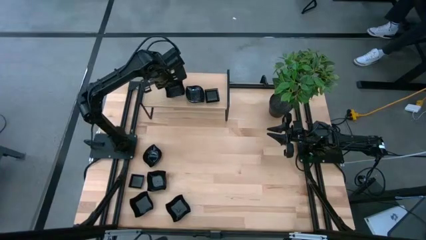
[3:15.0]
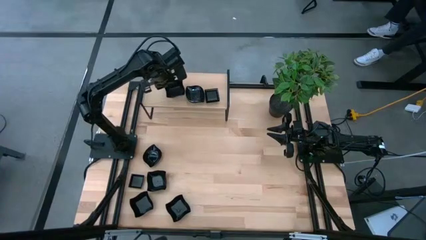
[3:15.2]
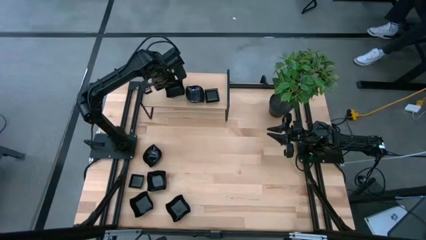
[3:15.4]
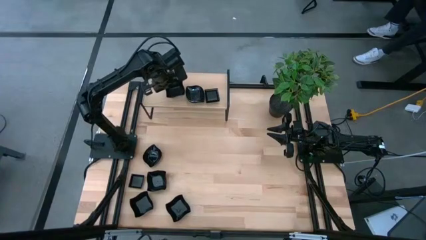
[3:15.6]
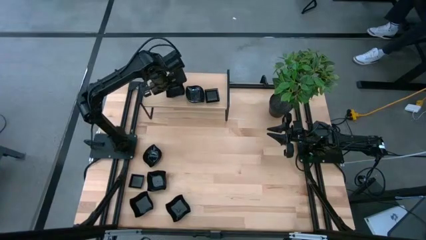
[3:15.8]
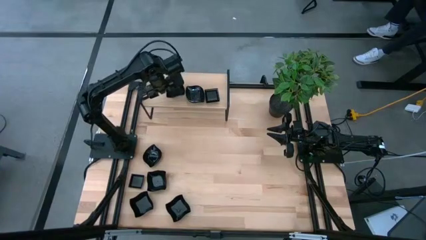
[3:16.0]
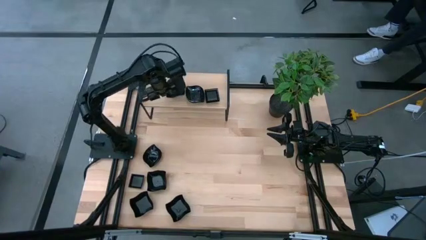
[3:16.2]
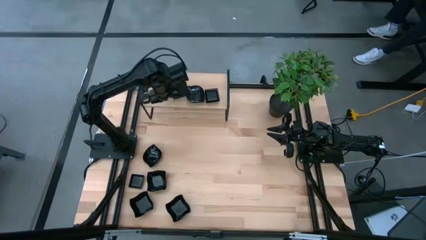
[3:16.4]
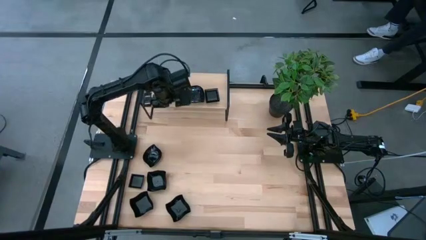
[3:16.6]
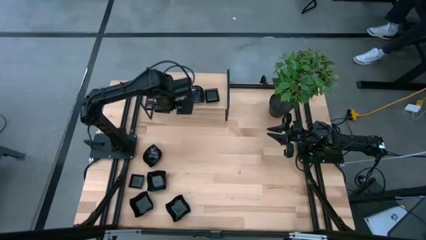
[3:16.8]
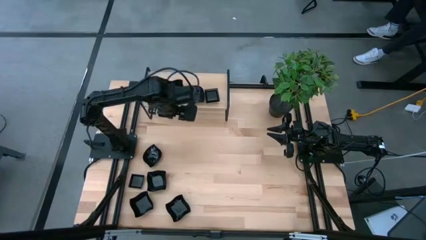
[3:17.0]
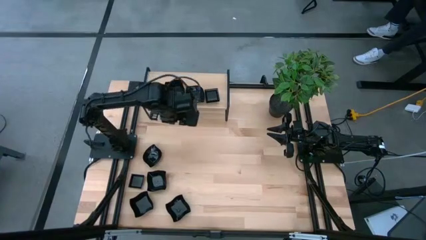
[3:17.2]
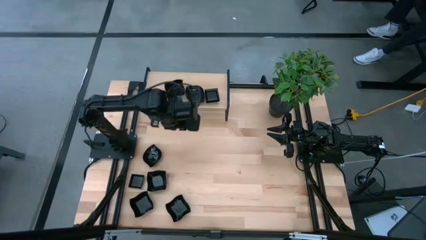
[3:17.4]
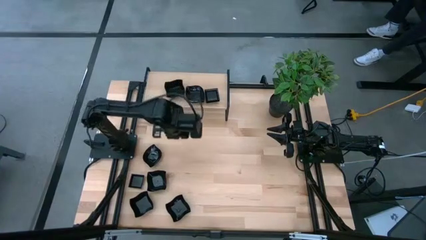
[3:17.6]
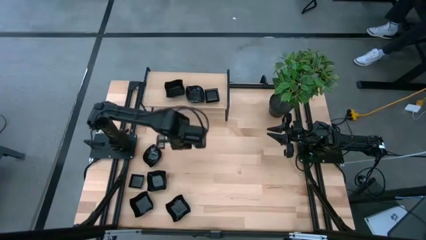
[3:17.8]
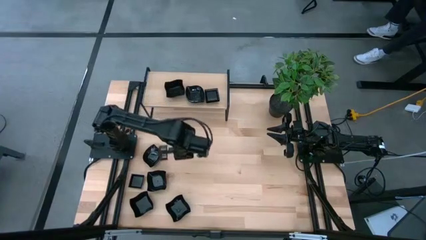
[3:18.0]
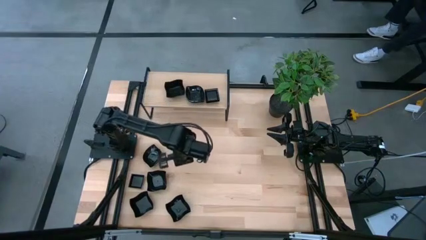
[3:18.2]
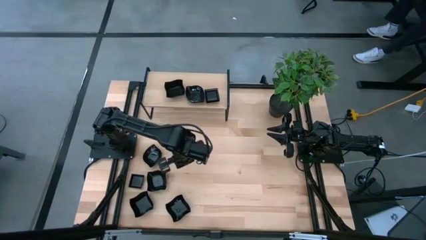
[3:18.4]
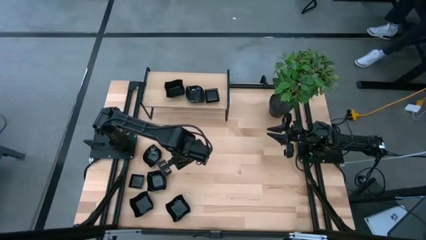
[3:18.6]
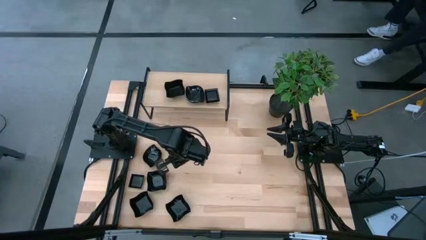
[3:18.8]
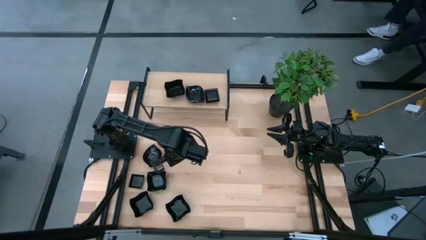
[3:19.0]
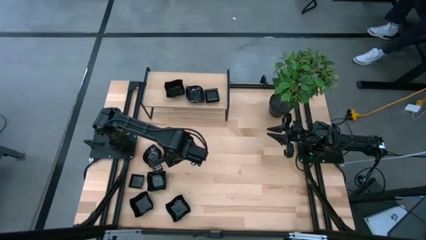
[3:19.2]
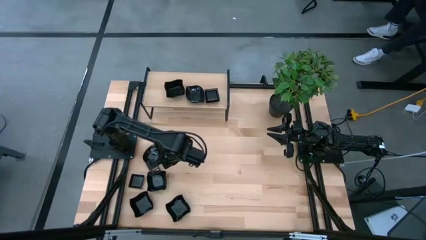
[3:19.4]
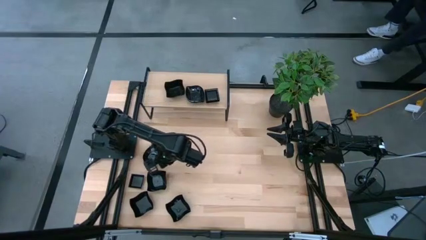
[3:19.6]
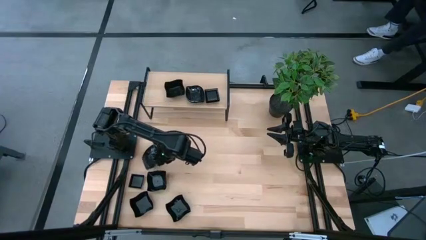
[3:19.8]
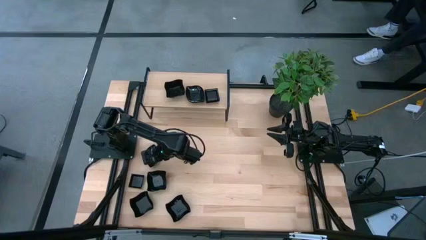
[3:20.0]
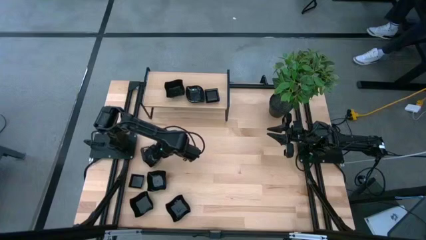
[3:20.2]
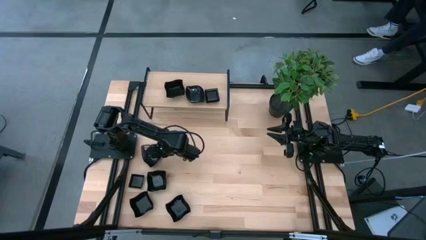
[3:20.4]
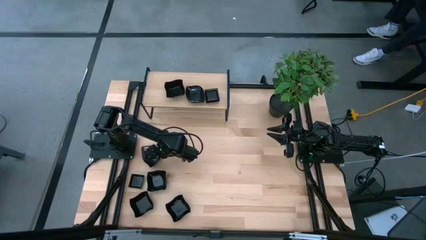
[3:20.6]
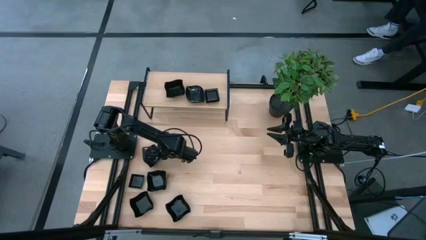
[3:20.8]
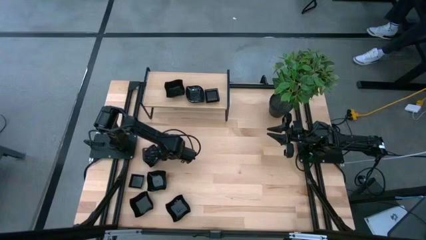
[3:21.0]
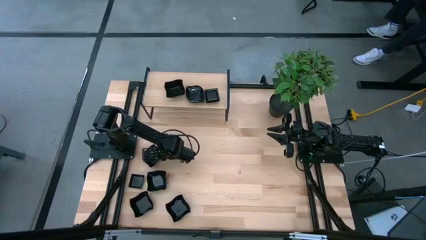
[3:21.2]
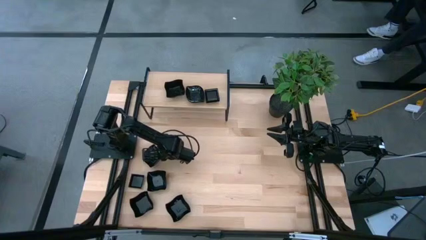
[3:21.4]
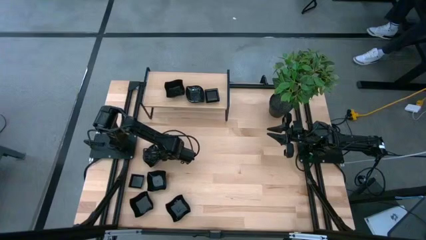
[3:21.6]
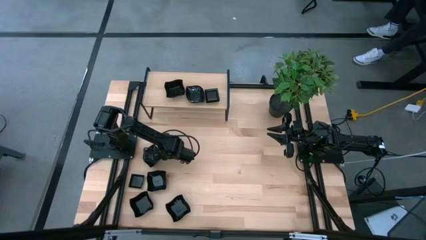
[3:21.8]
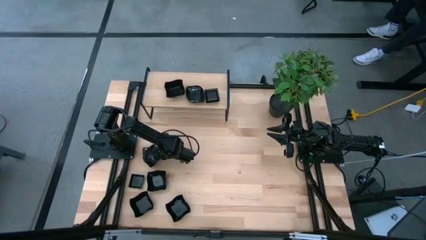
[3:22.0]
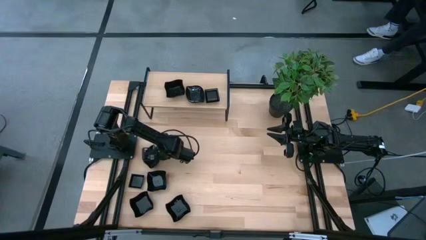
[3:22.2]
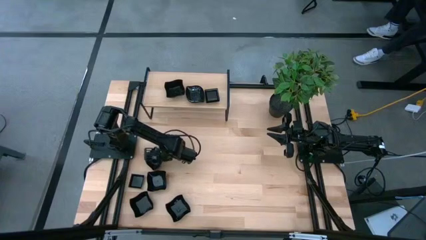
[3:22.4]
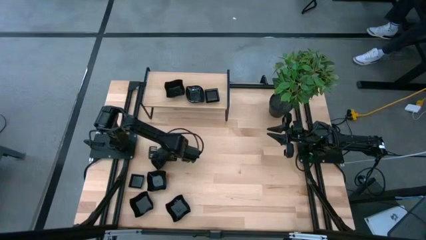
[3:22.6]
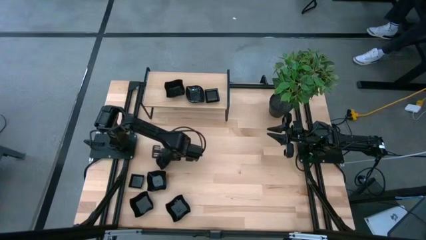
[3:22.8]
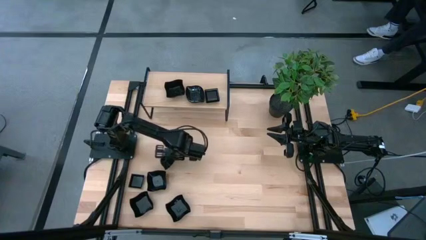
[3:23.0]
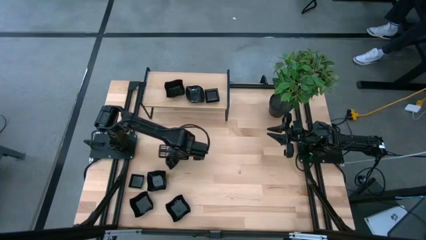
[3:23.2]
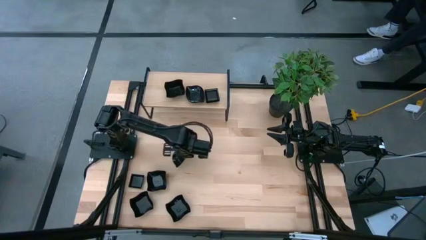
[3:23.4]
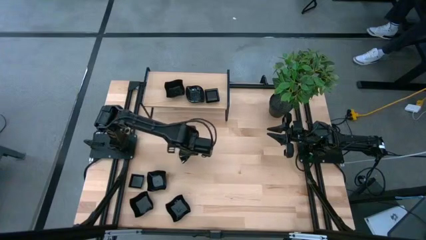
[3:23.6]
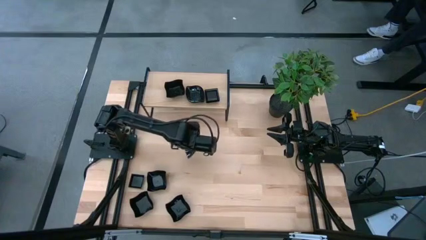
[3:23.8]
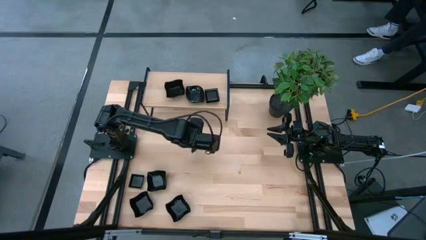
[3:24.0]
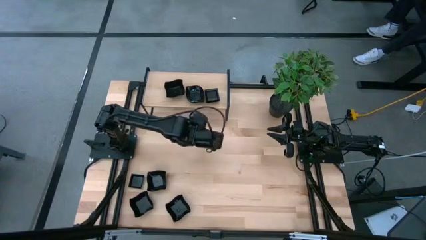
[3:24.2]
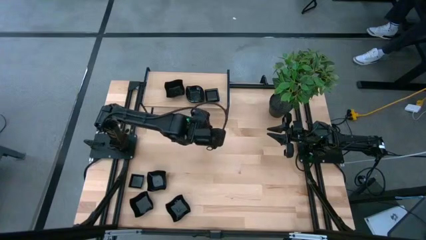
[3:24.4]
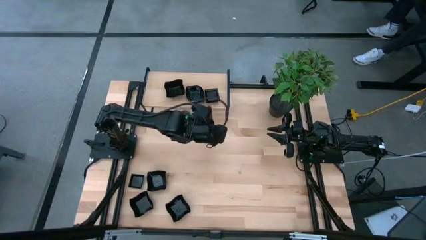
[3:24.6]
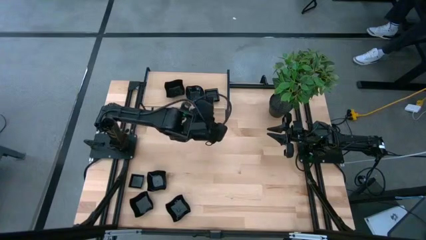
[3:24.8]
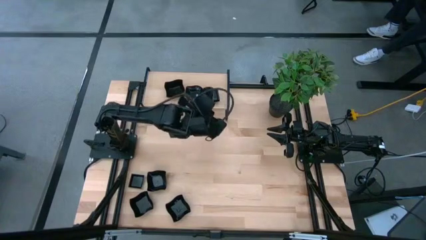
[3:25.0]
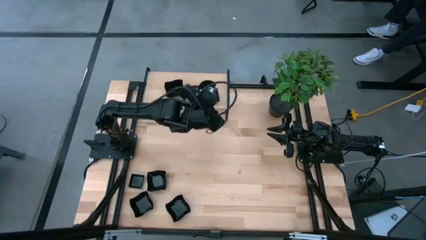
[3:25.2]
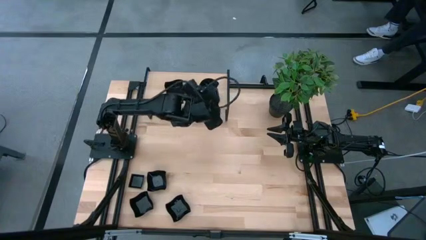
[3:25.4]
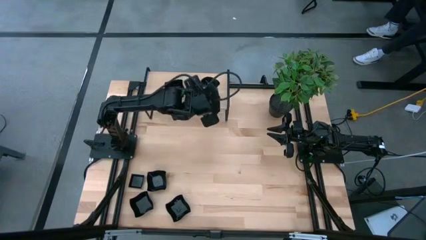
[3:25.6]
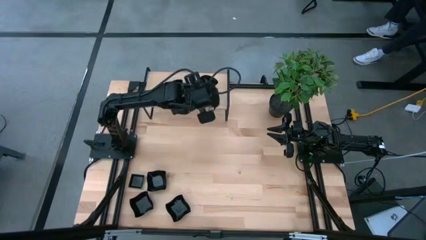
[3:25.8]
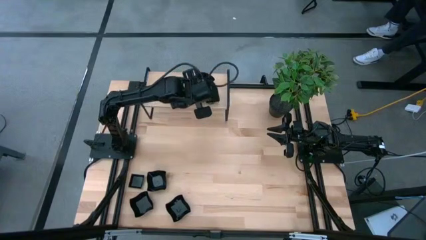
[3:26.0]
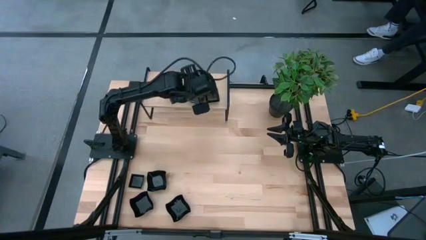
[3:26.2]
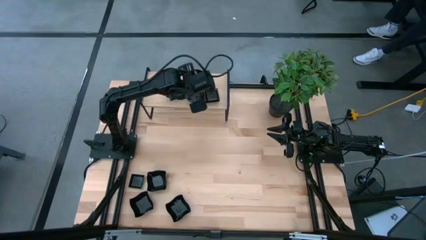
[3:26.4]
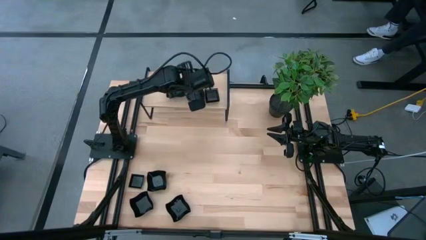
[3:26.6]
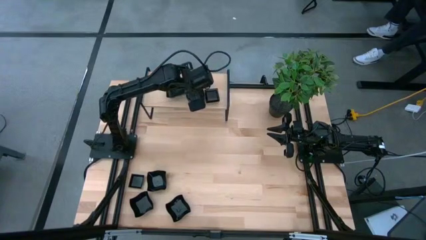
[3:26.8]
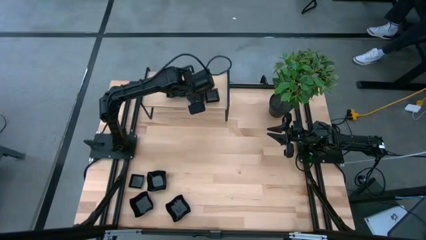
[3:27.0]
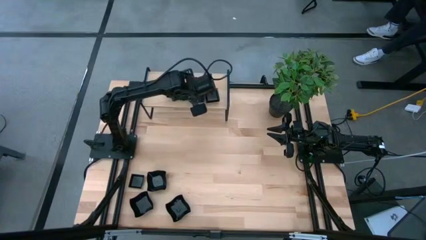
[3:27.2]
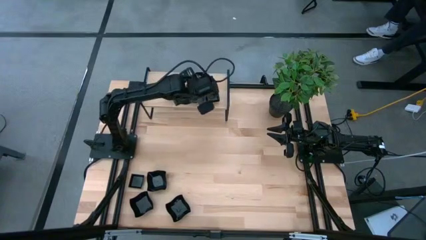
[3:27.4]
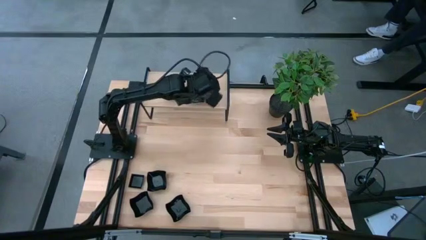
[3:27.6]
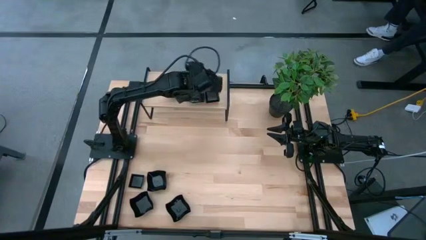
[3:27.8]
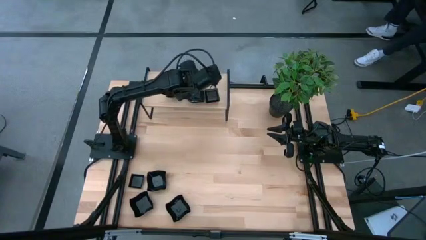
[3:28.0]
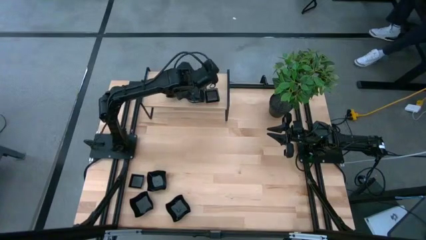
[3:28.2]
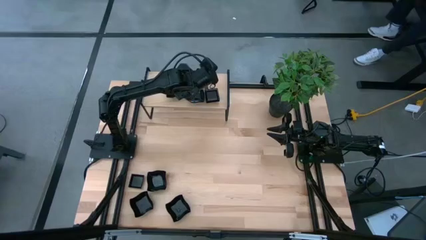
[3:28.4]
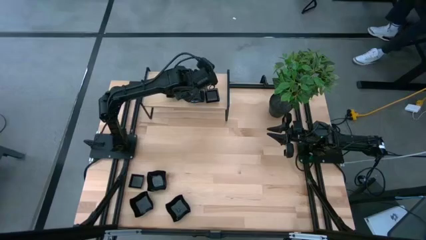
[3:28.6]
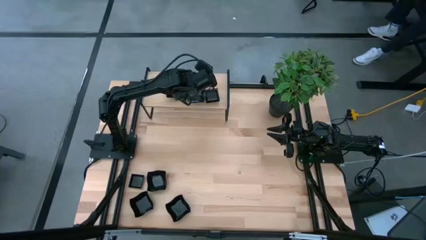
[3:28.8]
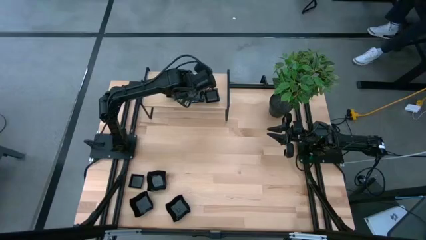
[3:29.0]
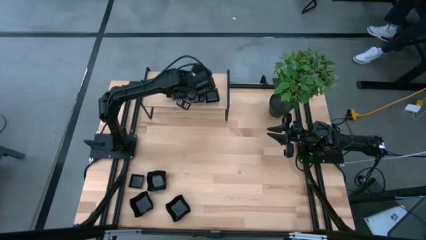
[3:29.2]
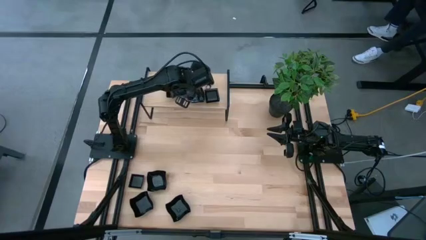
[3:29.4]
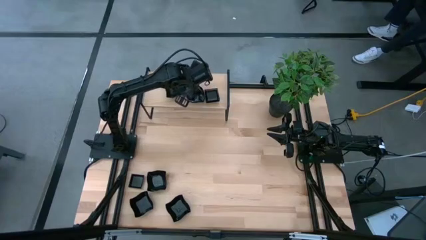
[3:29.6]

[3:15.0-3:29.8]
Task: Pick & Place Mini shaped plates
Stack the leaf shaped plate on top of the leaf shaped plates on the shelf

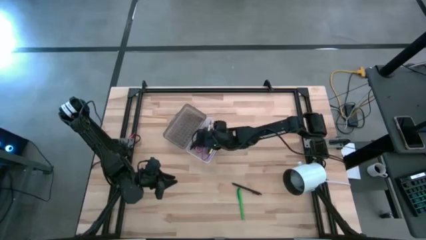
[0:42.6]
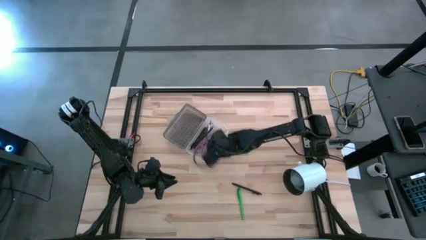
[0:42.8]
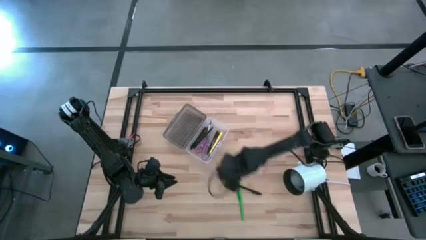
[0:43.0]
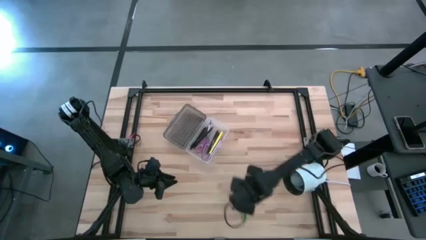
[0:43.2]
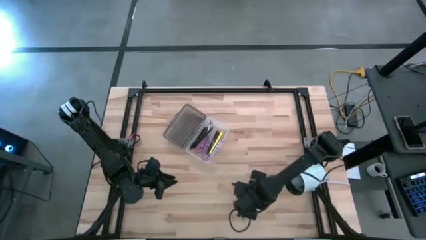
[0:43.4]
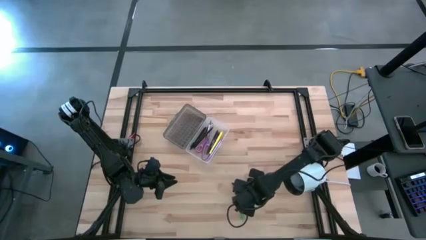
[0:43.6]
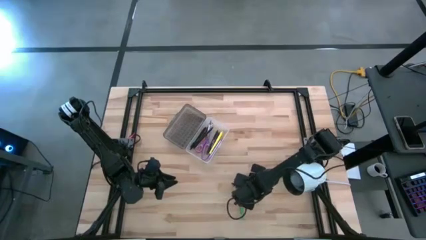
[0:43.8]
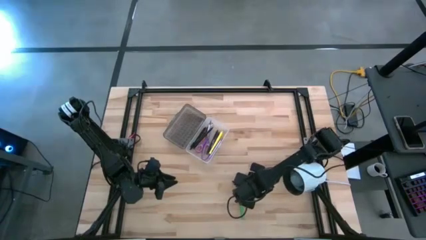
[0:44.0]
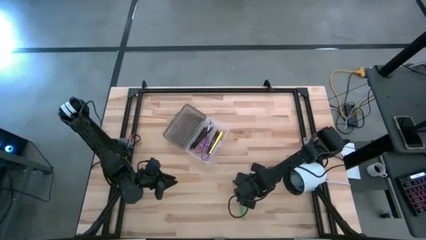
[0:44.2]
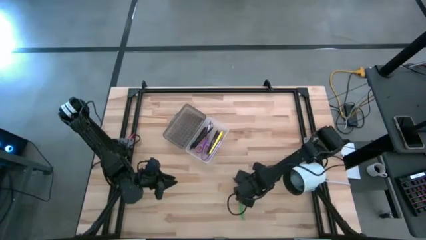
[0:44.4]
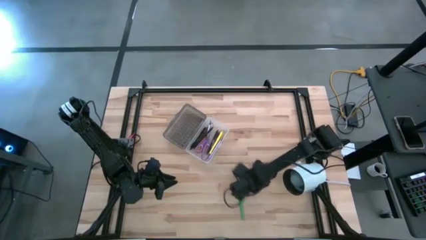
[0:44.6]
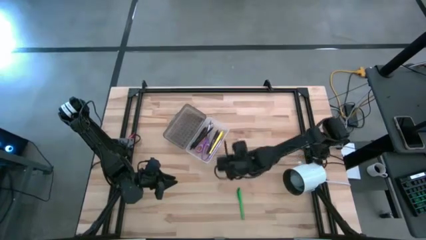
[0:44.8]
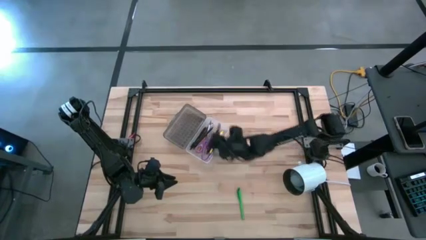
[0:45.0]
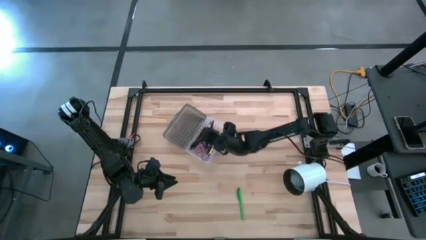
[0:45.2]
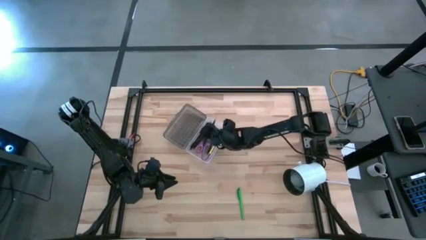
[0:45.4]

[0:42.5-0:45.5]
Task: Pick & place school supplies into a supply box
Put the black pen into the black supply box
